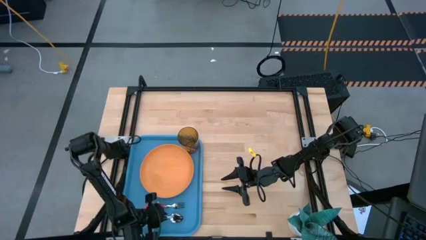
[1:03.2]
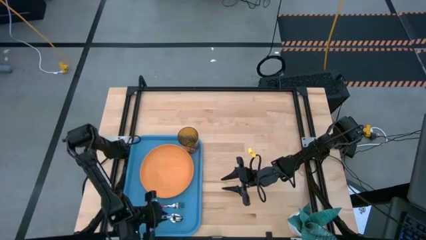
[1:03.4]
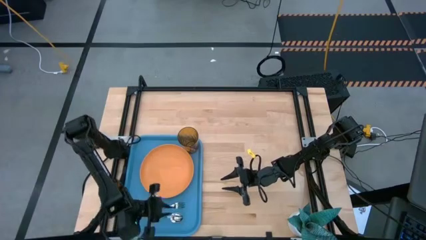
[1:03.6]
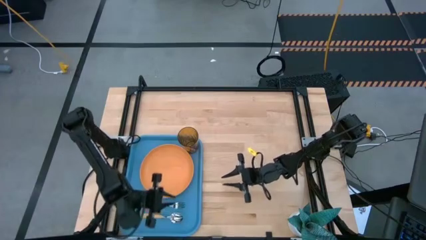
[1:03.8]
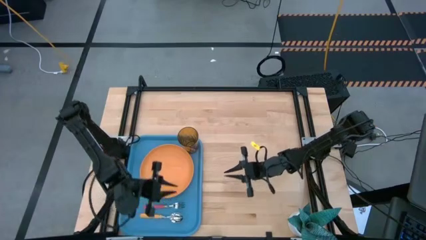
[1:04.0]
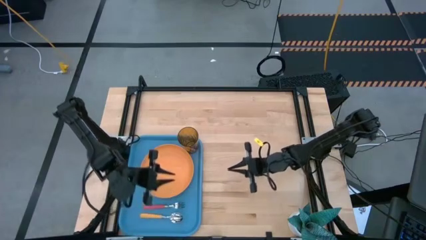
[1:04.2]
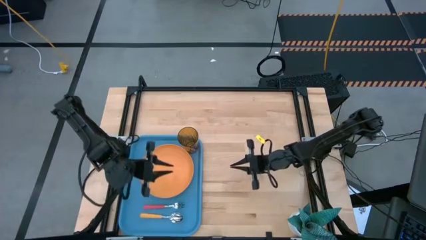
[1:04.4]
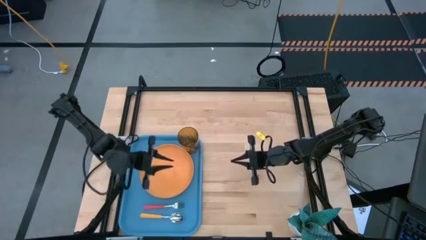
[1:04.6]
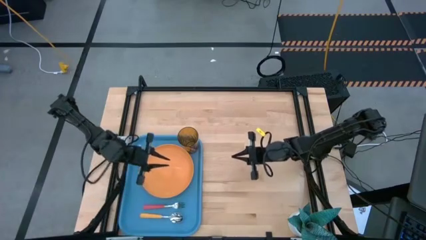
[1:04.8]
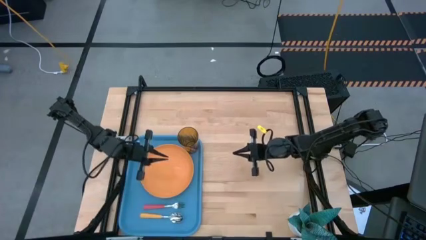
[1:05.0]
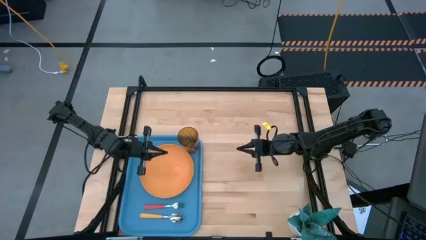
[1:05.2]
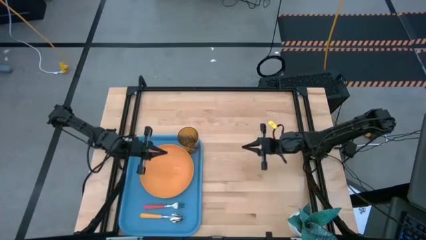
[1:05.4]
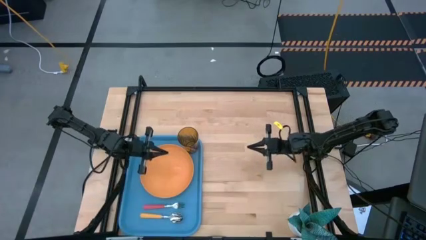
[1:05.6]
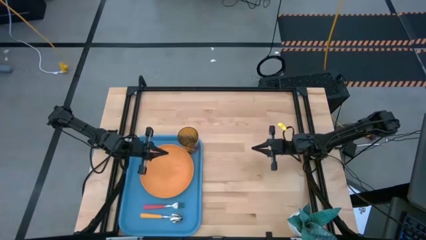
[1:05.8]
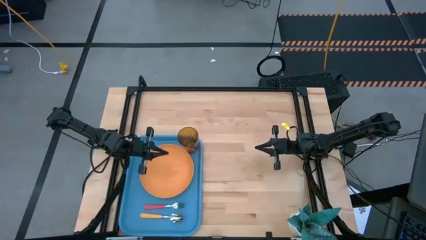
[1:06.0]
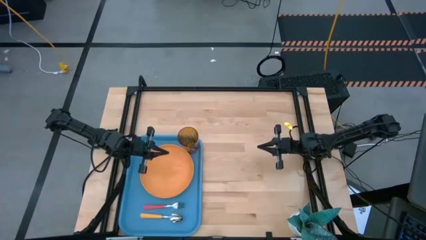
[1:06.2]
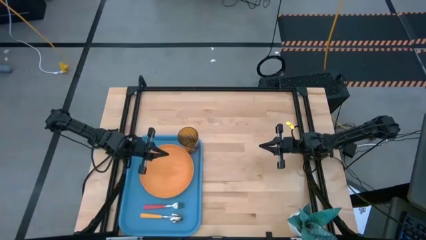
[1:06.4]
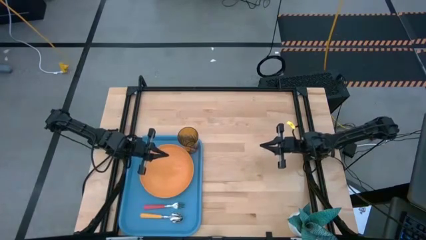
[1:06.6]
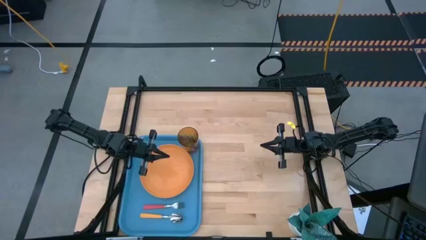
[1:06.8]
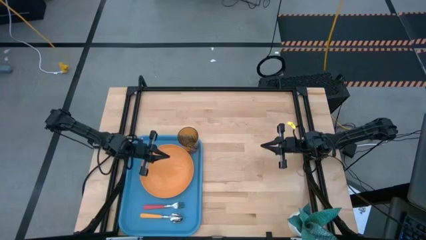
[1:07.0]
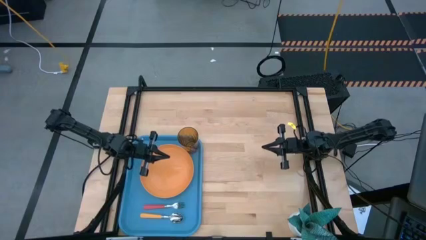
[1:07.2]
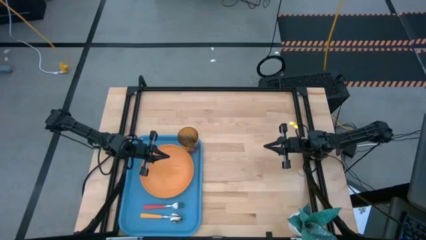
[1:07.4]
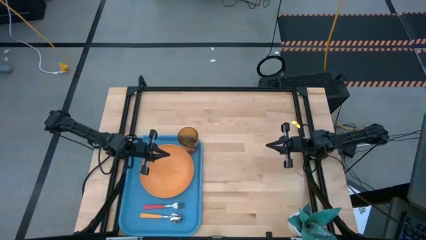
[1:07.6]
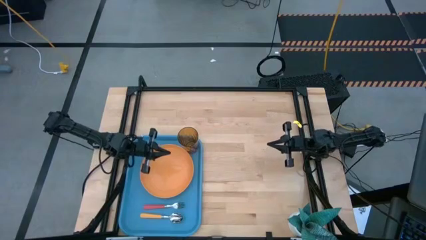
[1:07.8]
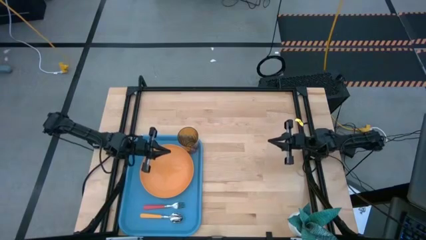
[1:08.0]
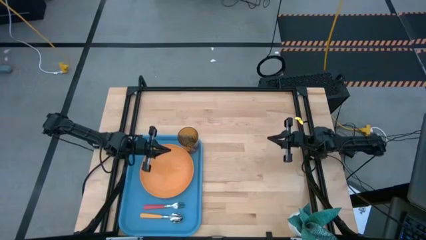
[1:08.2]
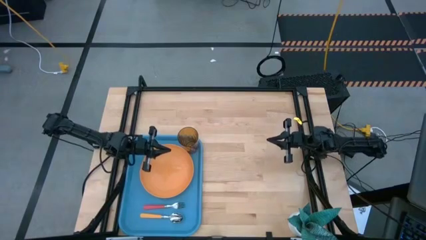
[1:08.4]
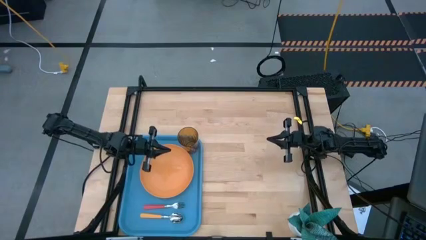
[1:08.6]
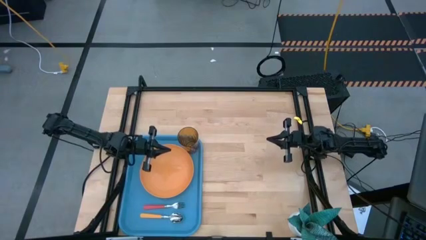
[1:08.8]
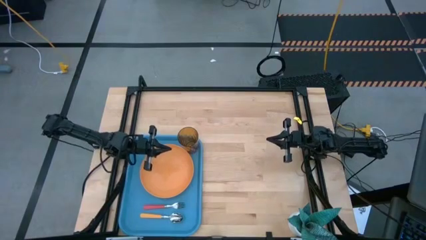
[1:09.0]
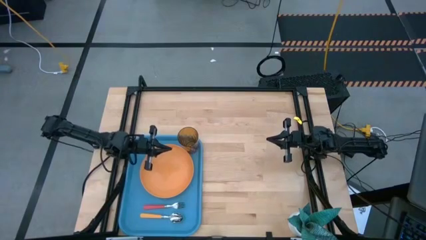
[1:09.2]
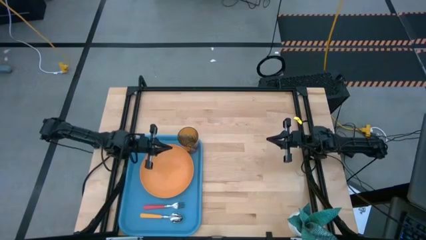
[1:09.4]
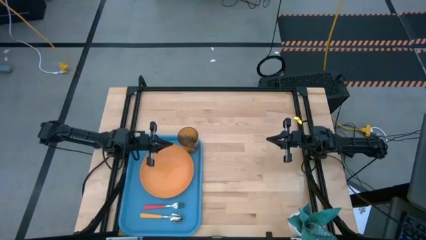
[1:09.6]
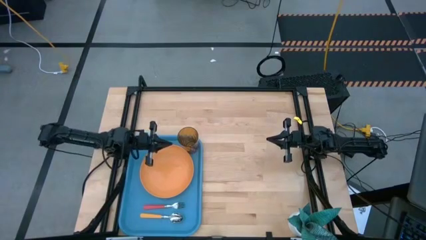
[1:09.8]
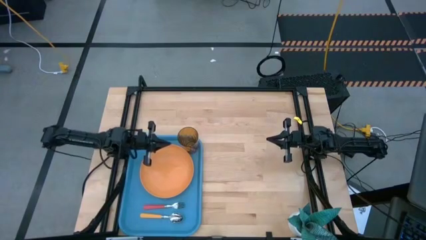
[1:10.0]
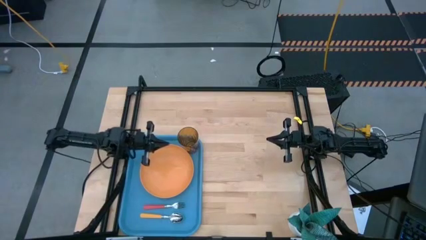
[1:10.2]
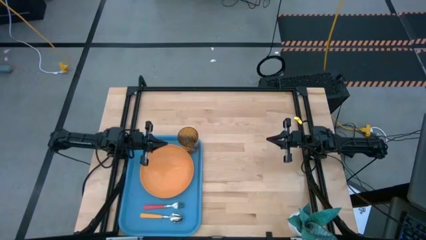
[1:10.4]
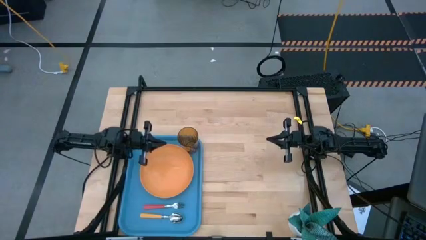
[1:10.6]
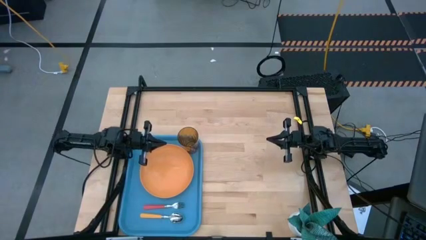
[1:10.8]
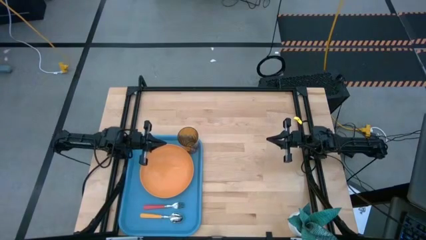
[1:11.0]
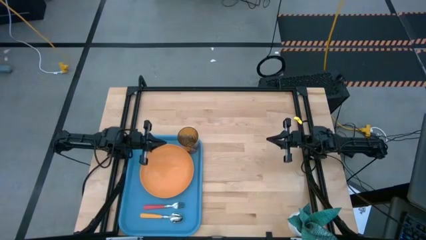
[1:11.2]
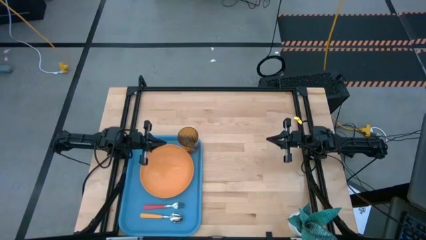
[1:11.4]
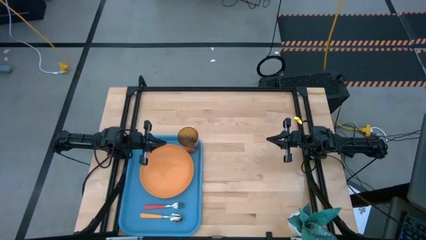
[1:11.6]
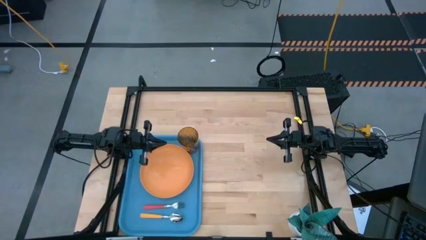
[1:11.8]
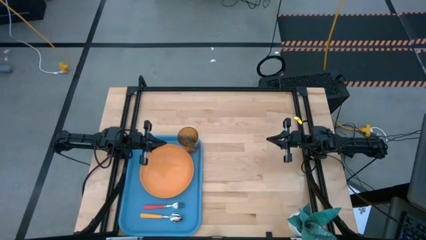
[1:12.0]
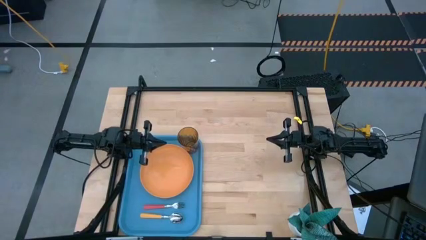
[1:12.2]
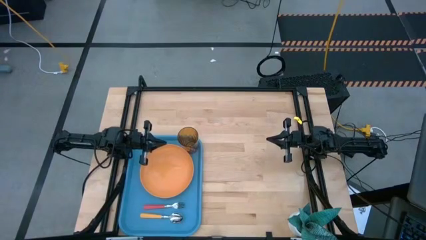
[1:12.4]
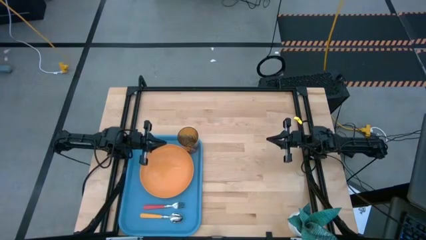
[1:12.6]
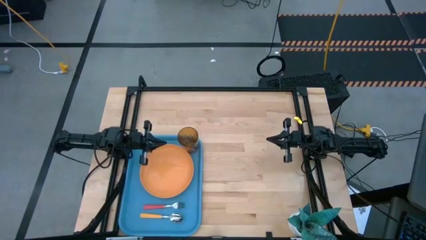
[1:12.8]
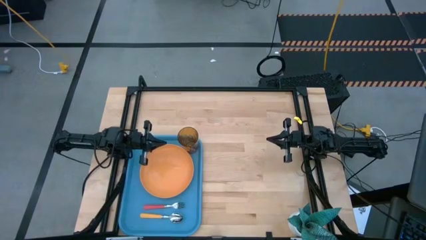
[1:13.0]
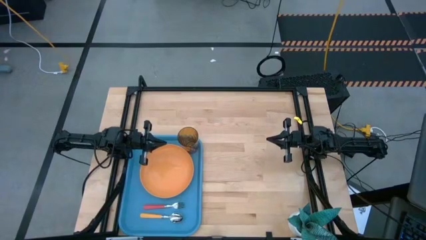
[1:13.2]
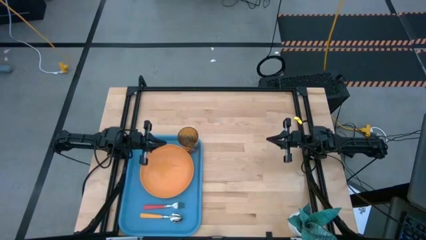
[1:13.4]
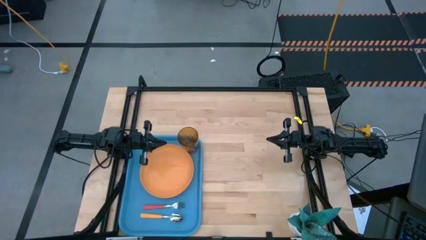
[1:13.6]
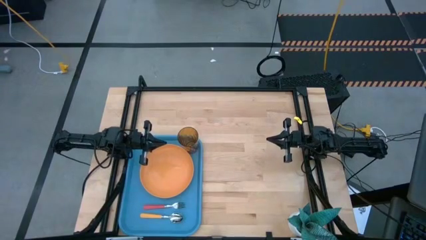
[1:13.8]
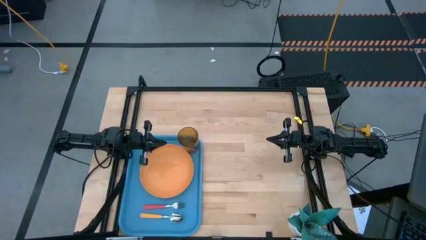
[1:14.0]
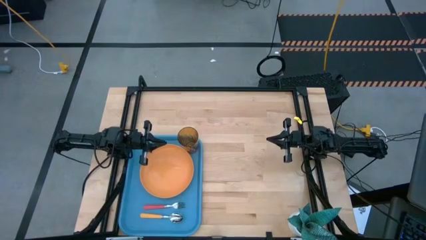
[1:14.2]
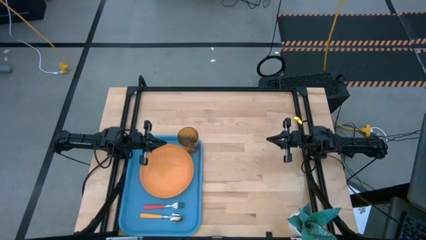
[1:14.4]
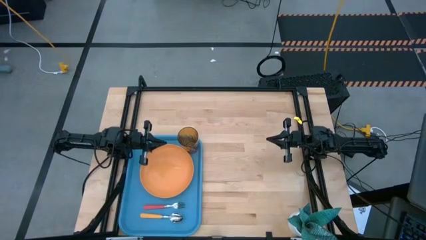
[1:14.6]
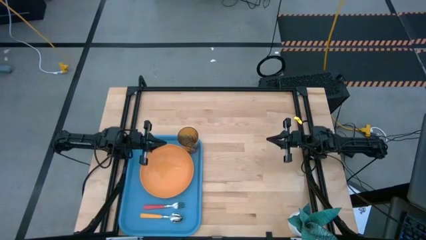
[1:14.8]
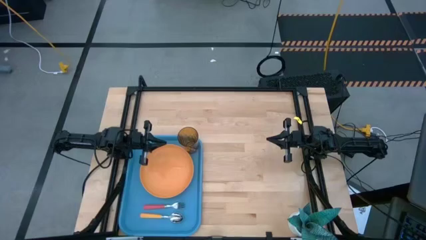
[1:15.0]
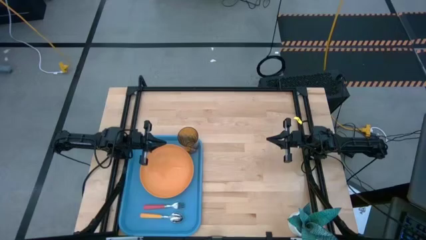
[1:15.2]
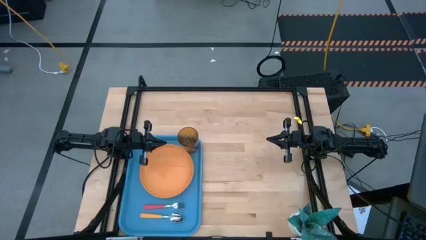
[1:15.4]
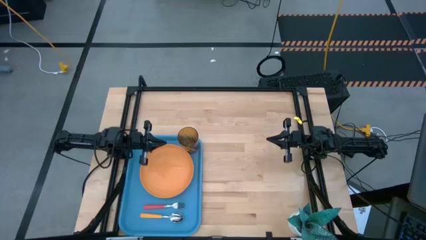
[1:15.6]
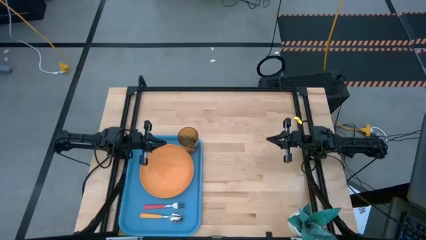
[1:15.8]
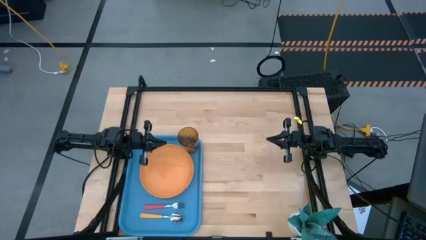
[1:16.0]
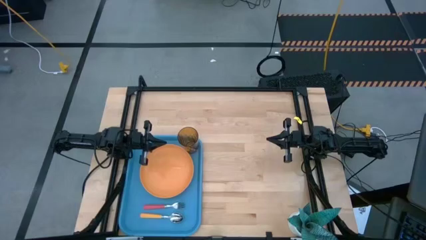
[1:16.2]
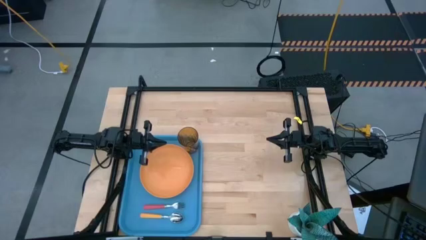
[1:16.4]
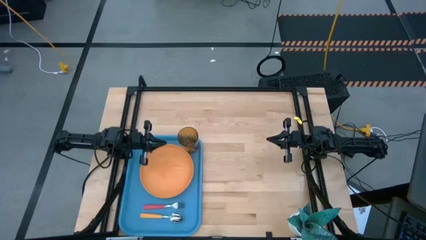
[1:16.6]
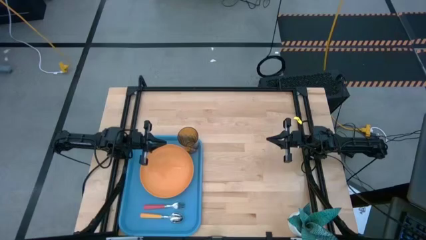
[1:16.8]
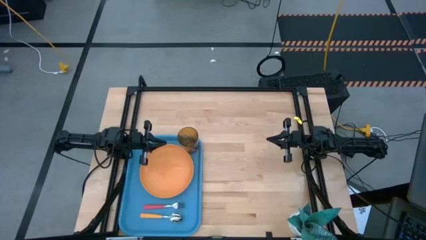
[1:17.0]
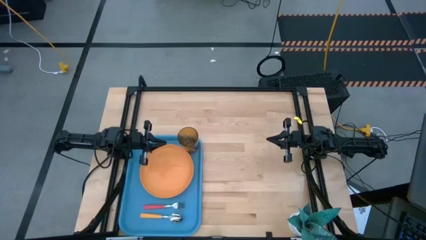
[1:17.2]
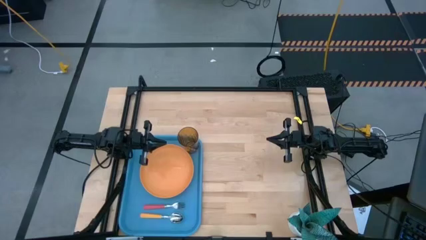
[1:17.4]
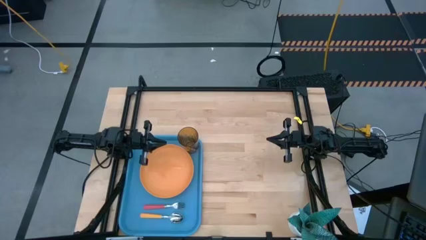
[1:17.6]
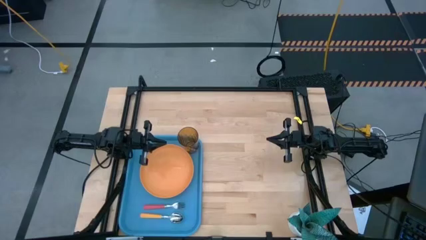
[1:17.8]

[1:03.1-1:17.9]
Task: Pick and place plate/cup/fork/spoon on tray
Return to Home Position
